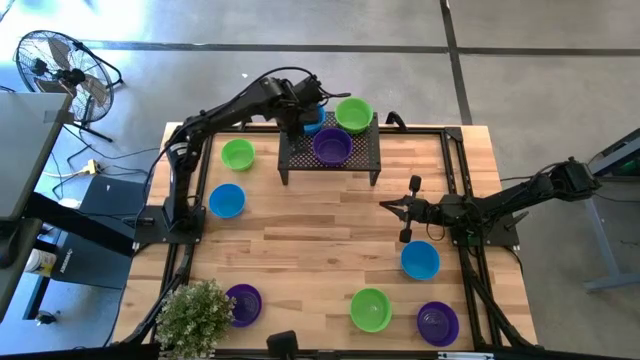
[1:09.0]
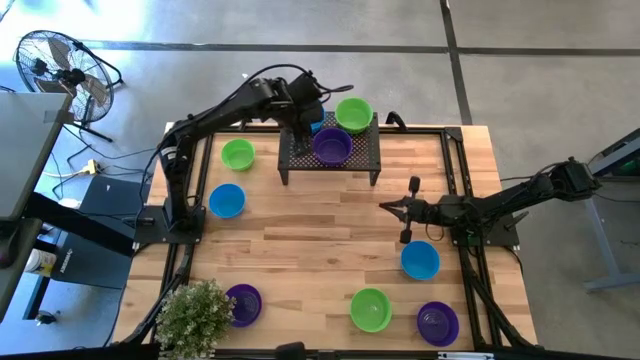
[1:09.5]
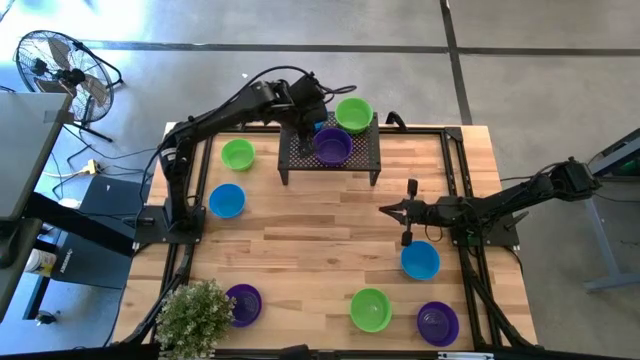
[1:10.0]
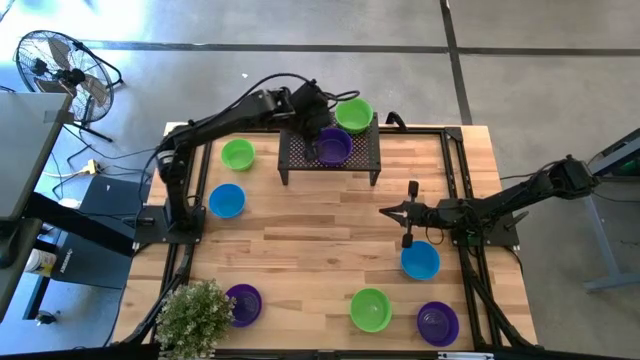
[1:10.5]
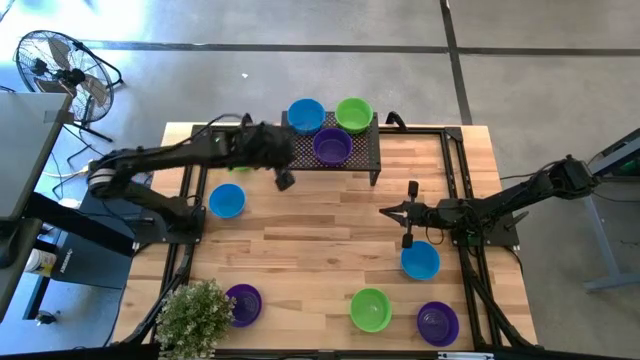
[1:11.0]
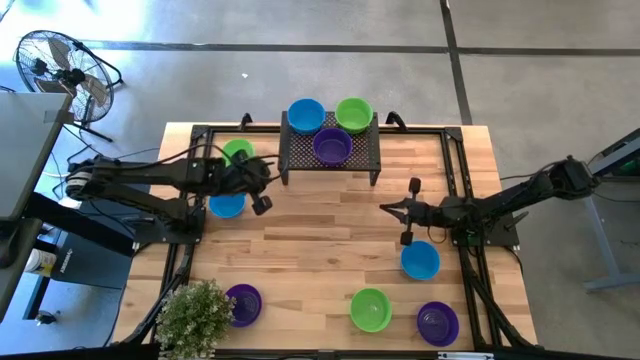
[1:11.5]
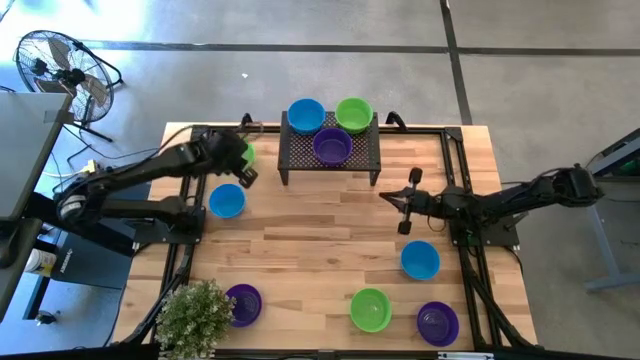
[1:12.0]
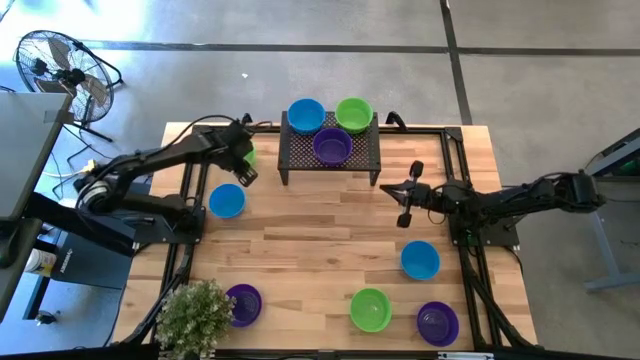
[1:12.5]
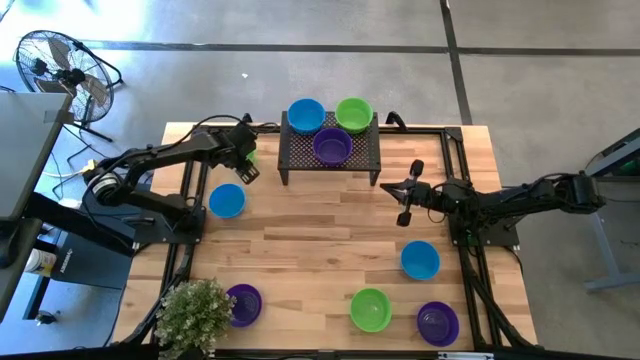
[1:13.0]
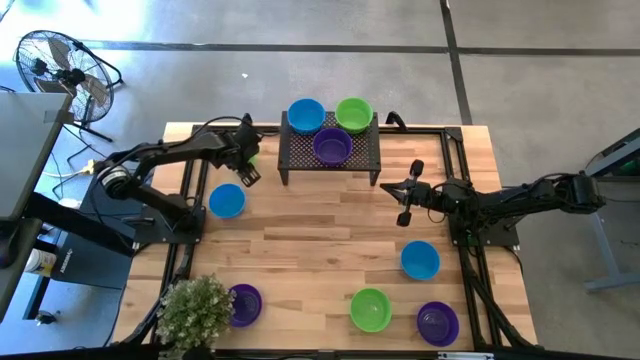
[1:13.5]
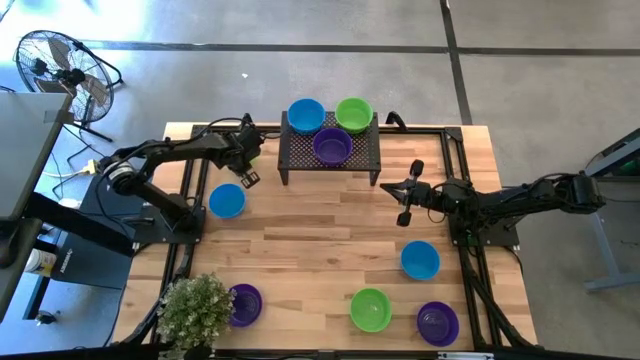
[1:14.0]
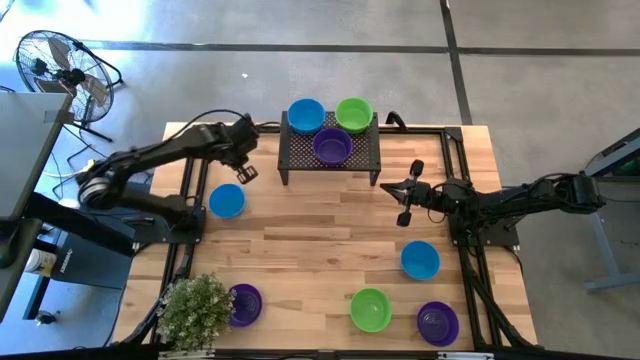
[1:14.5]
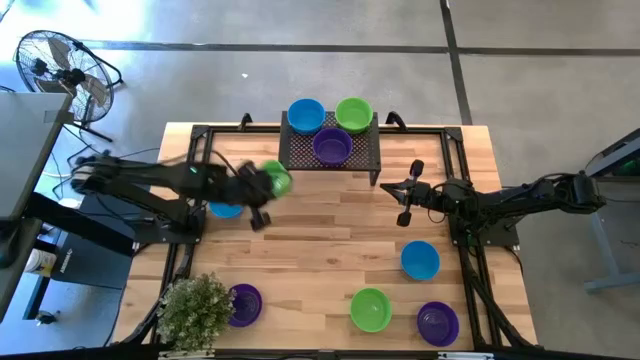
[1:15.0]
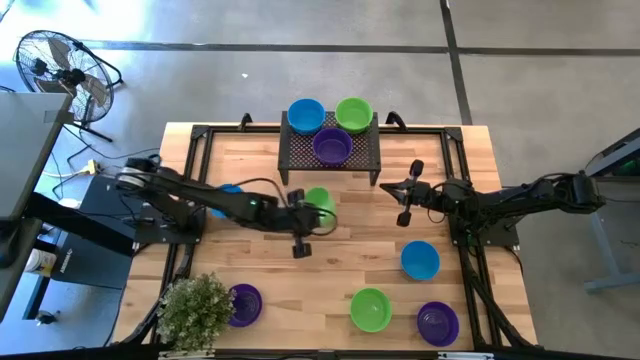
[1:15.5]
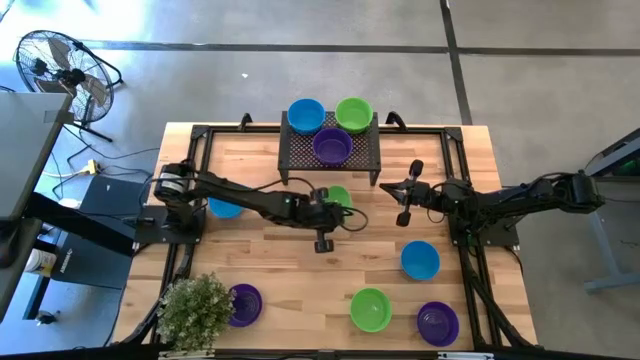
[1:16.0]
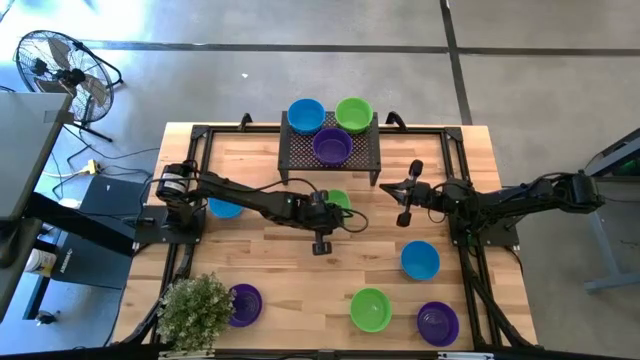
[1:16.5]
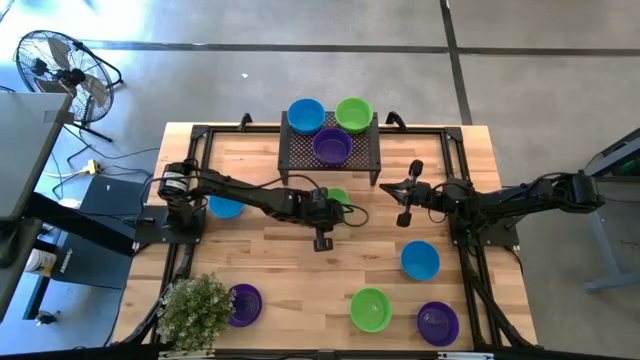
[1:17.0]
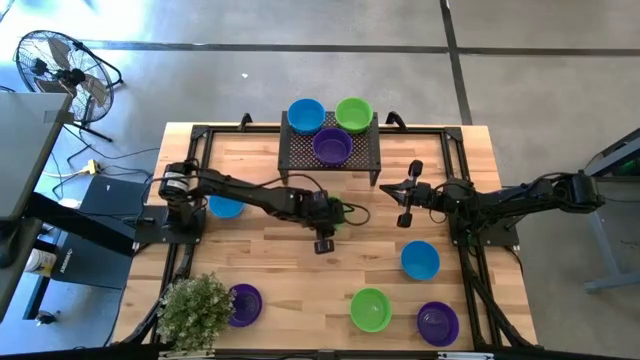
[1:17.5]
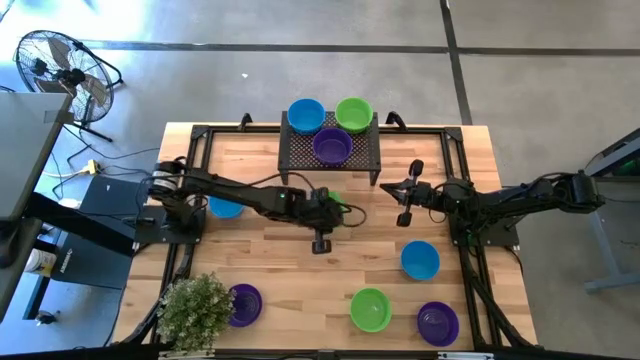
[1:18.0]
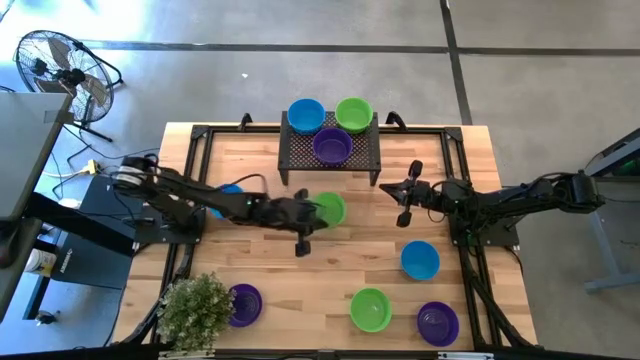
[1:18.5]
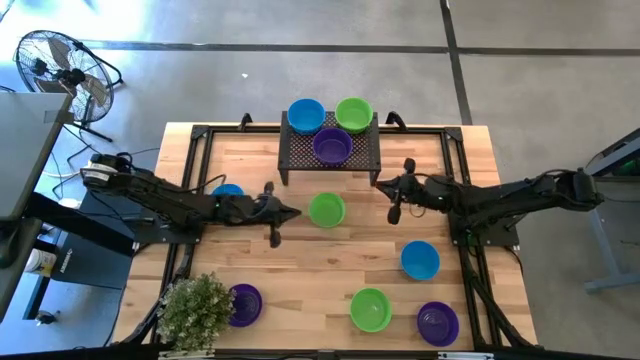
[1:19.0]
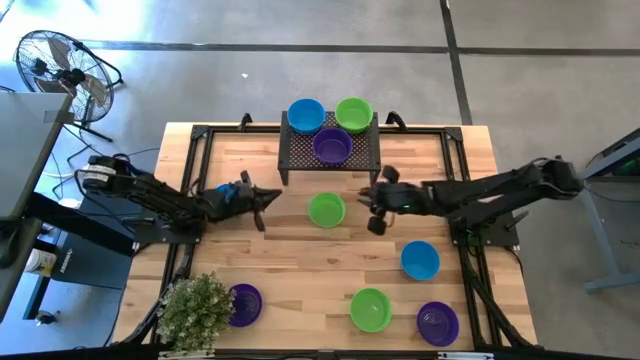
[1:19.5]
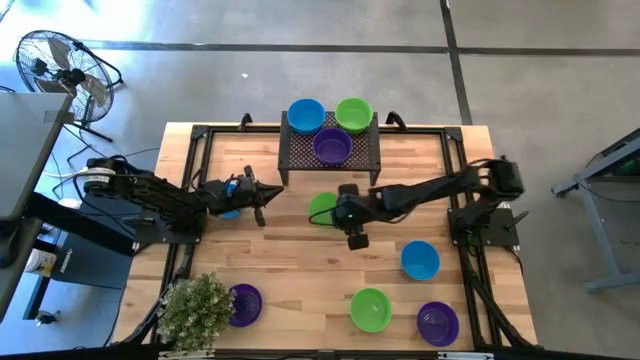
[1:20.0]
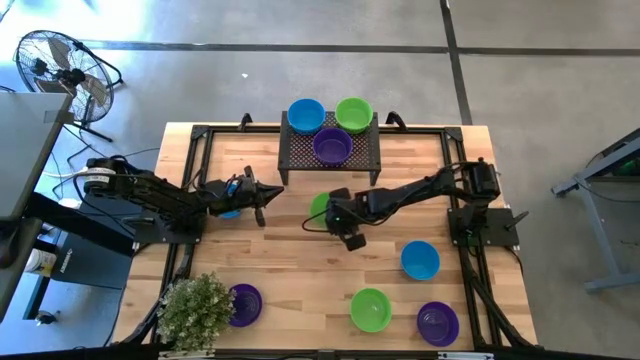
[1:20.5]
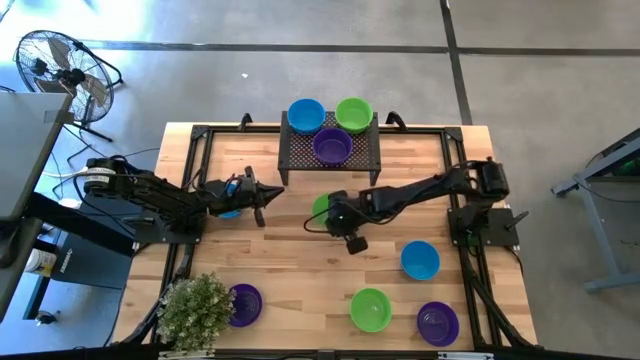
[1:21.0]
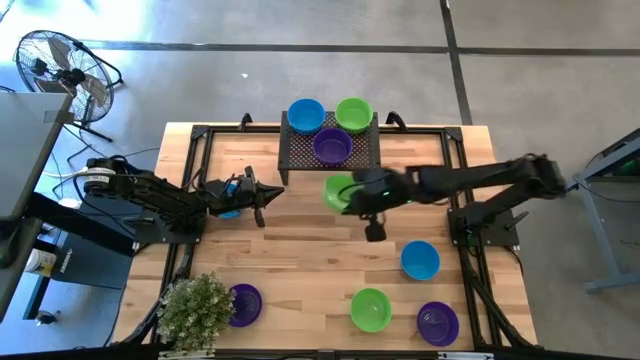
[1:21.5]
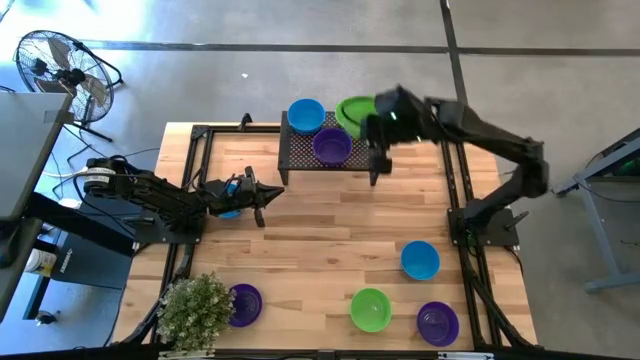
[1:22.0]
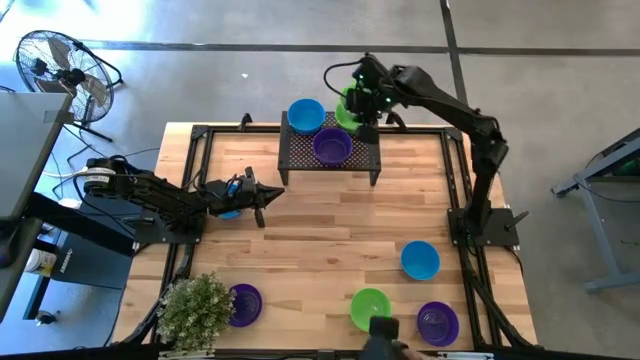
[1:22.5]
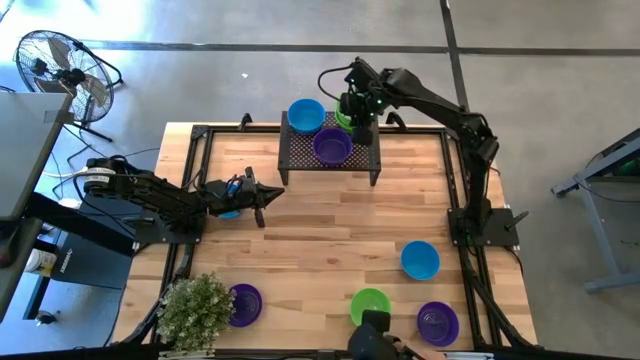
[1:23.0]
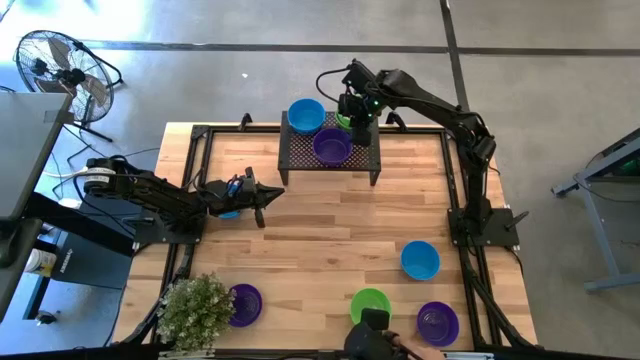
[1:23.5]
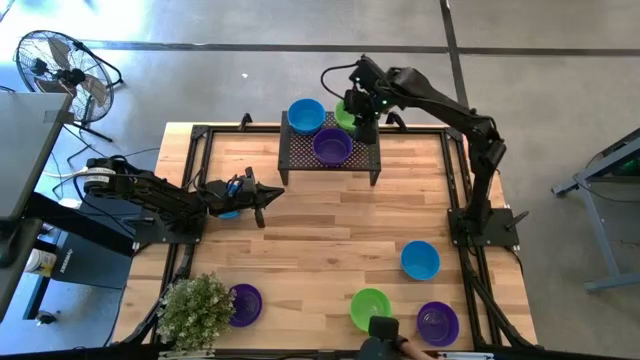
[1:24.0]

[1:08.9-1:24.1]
Task: Pick & Place Mini bowls
Stack the top green bowl on the green bowl on the shelf

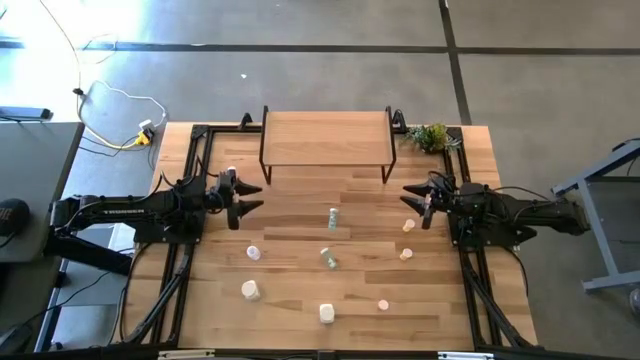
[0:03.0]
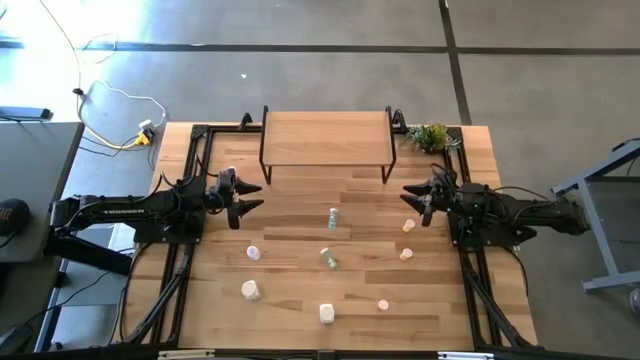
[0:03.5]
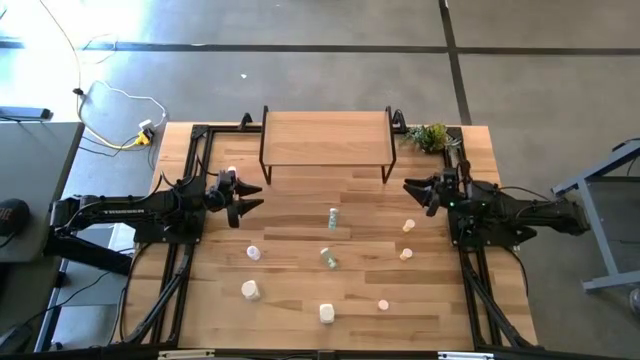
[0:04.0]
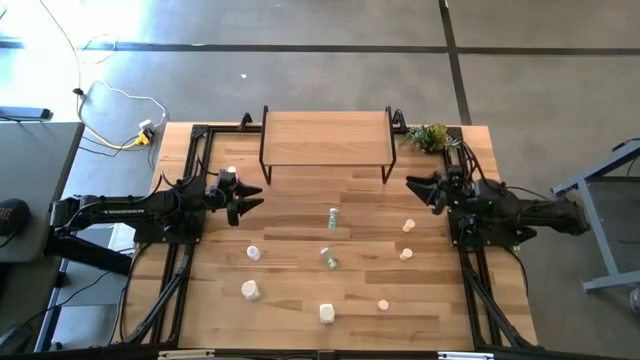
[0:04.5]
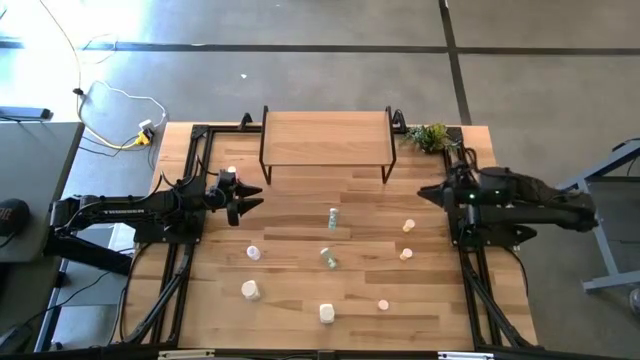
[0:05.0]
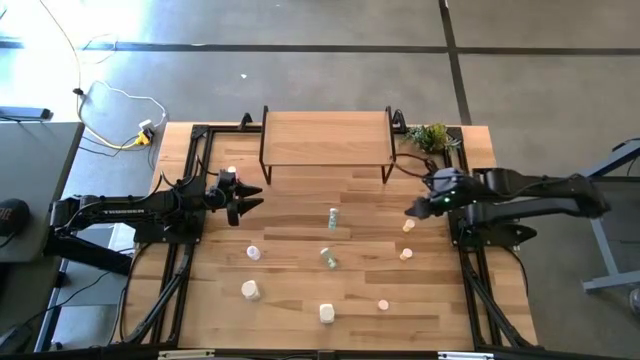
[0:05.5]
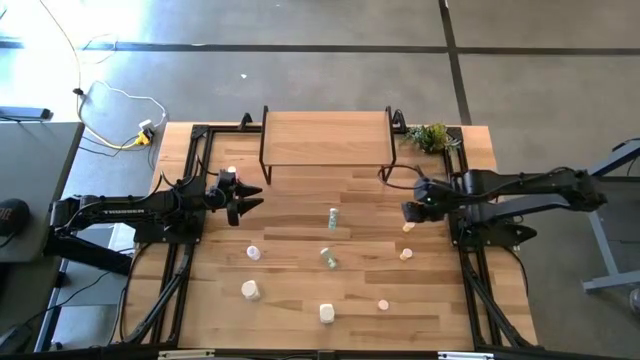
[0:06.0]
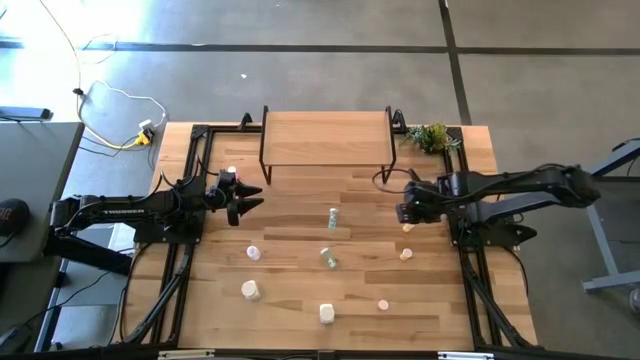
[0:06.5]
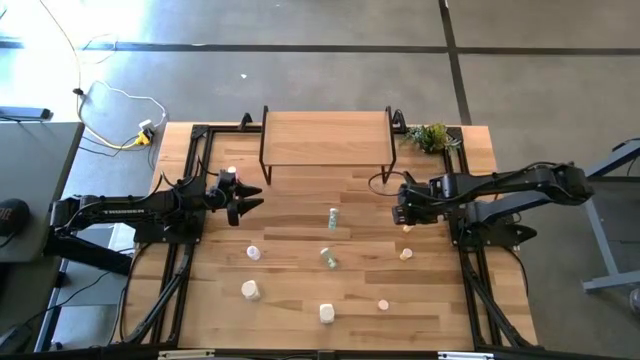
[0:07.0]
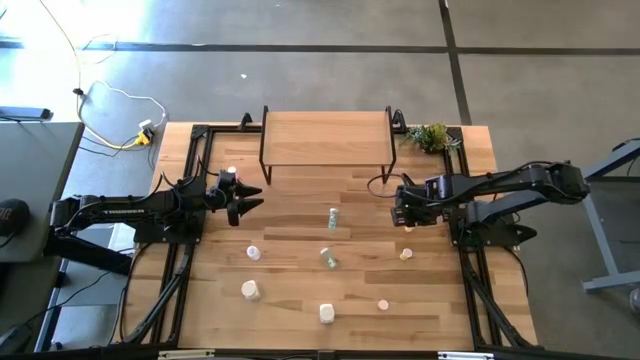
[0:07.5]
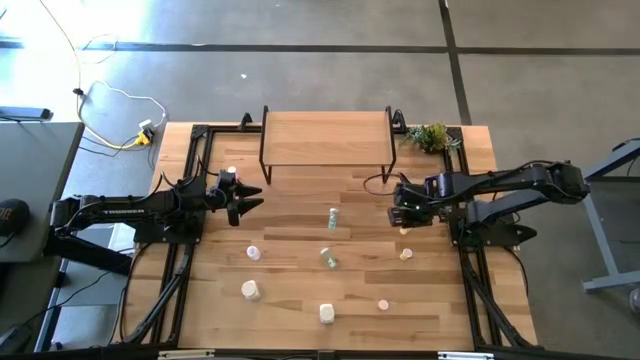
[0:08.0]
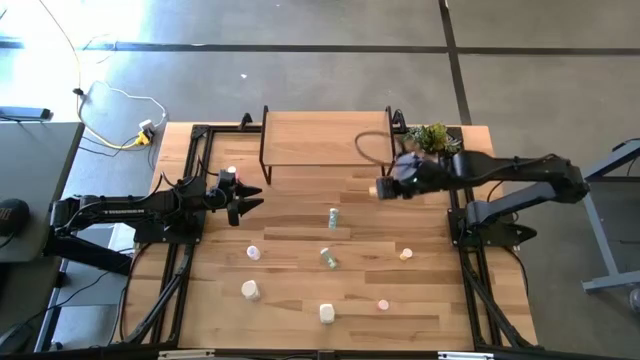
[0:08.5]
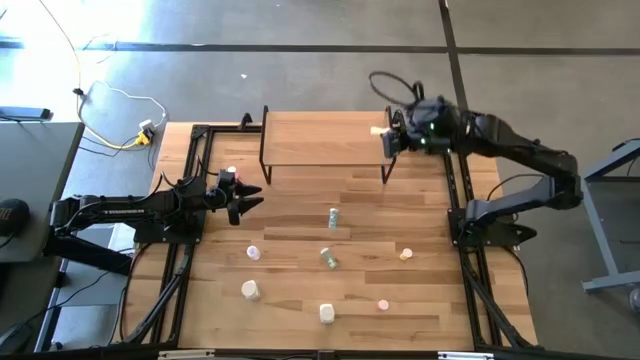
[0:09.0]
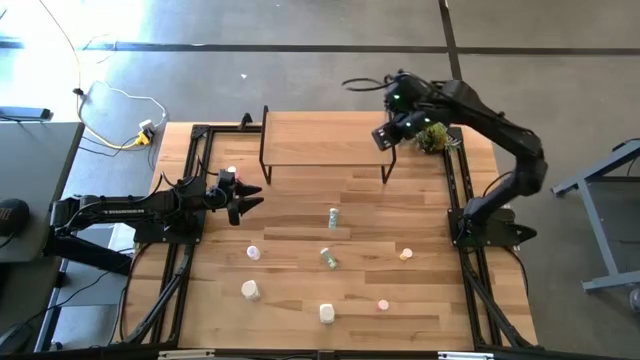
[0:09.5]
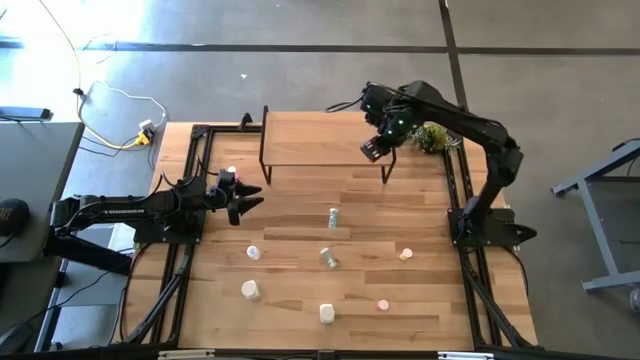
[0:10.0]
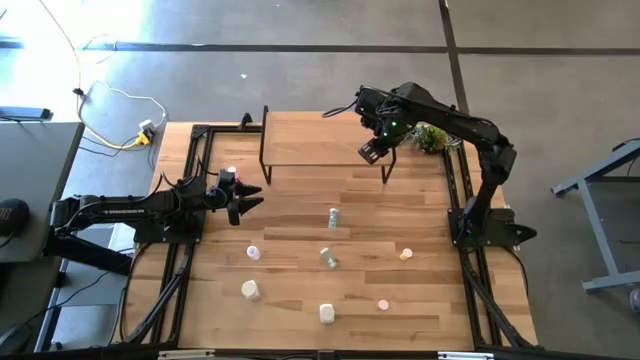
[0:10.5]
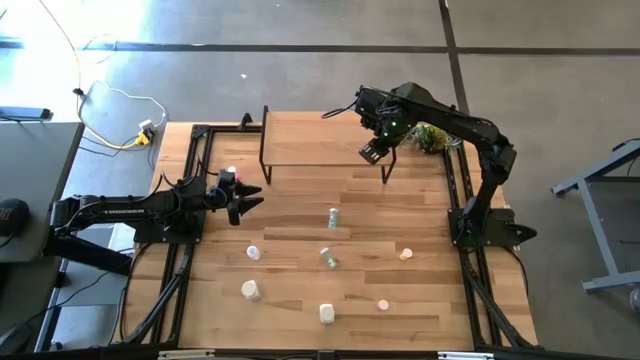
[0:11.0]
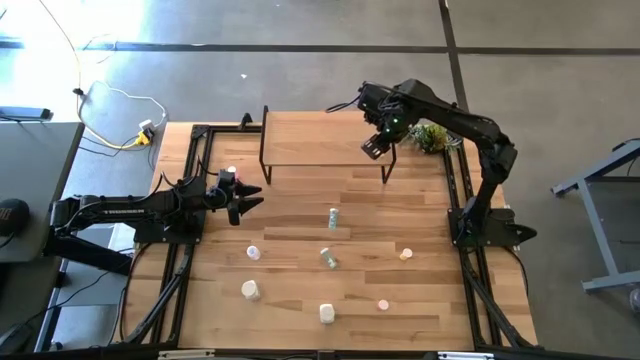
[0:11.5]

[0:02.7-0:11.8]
Task: Pick and place medicine bottles onto shelf by color
Put the top yellow medicine bottle on the shelf
